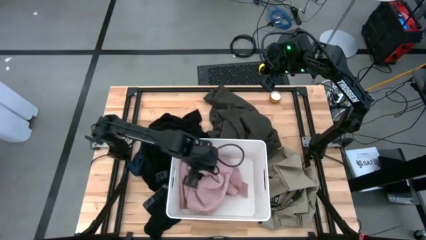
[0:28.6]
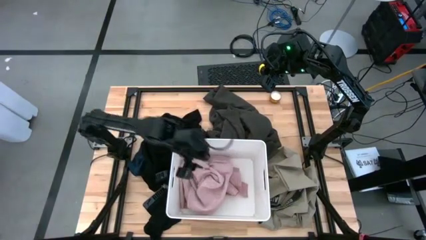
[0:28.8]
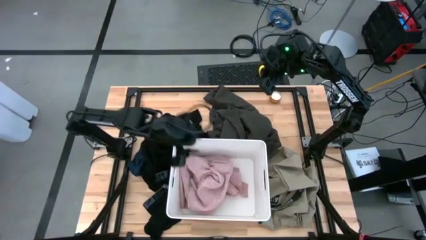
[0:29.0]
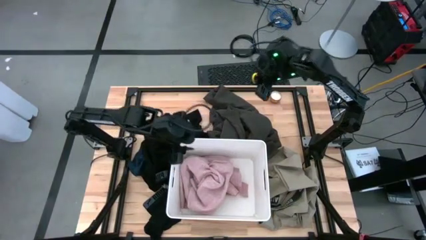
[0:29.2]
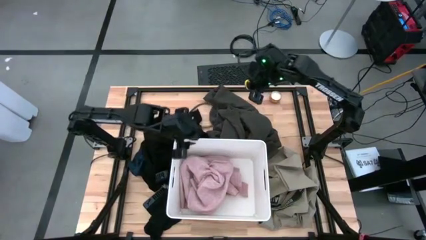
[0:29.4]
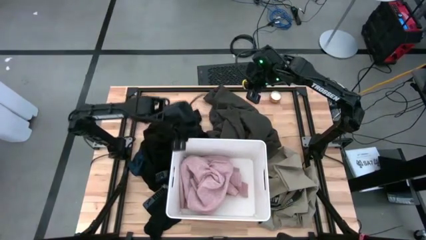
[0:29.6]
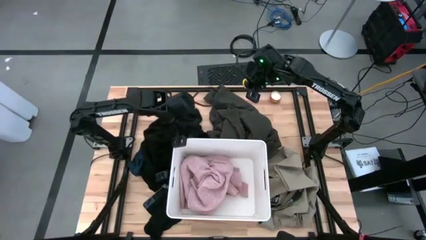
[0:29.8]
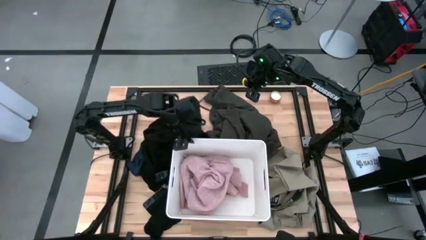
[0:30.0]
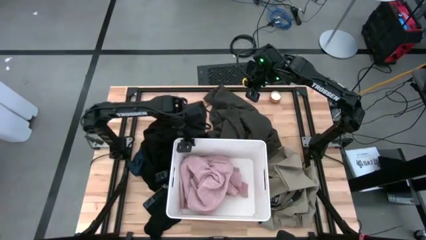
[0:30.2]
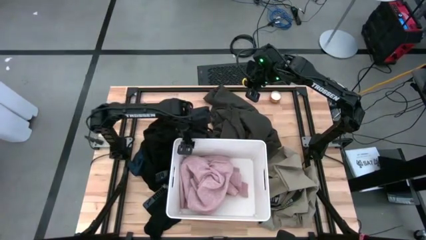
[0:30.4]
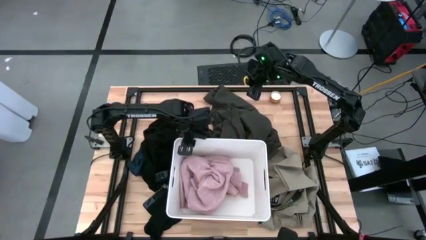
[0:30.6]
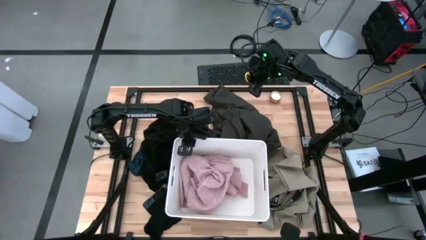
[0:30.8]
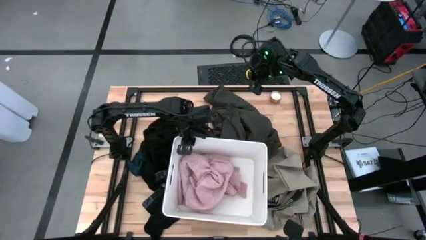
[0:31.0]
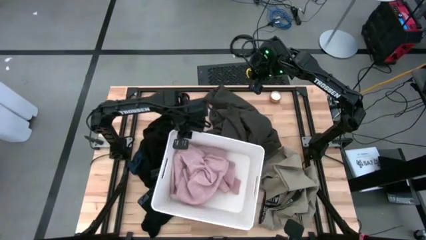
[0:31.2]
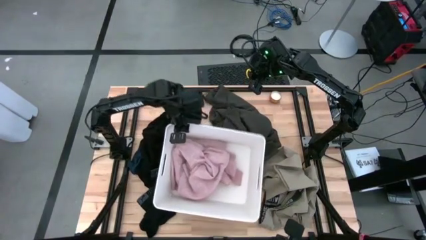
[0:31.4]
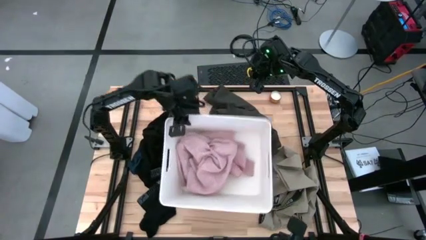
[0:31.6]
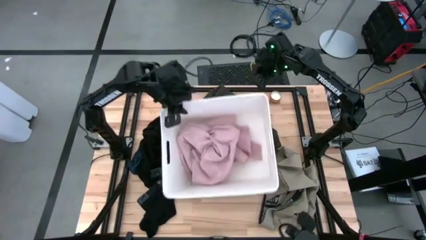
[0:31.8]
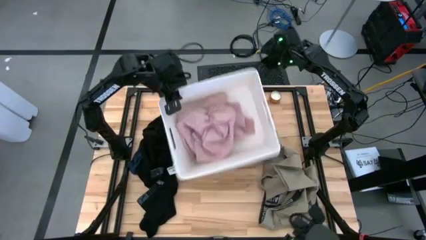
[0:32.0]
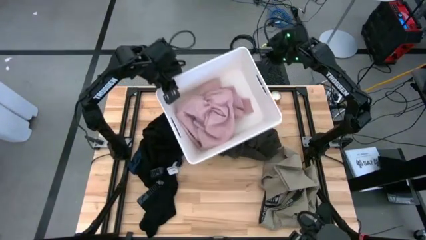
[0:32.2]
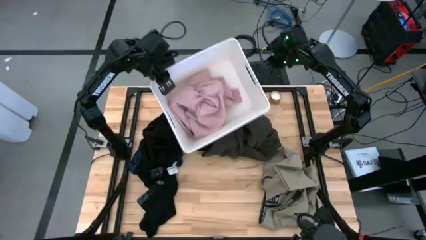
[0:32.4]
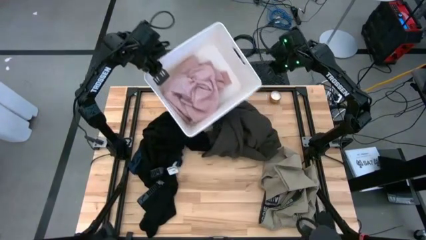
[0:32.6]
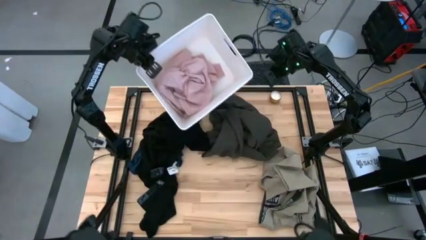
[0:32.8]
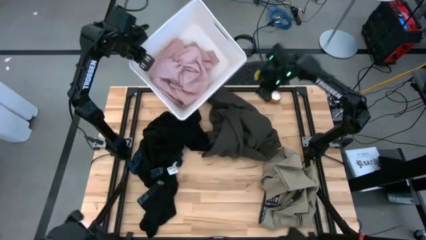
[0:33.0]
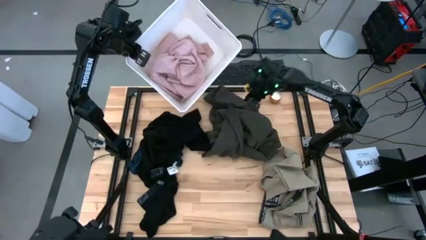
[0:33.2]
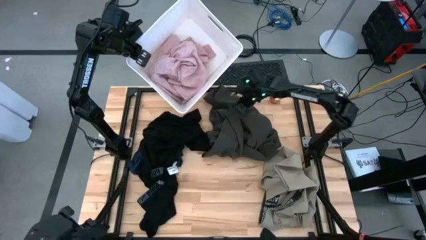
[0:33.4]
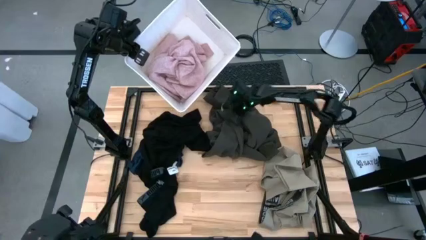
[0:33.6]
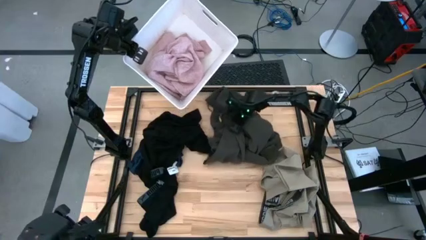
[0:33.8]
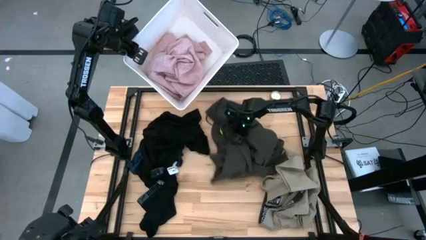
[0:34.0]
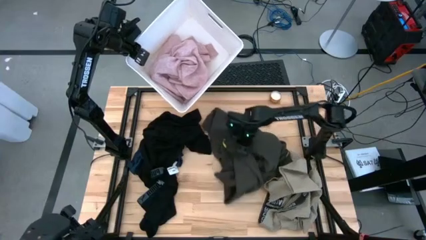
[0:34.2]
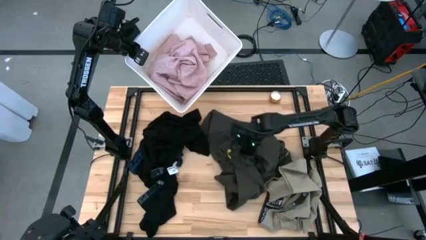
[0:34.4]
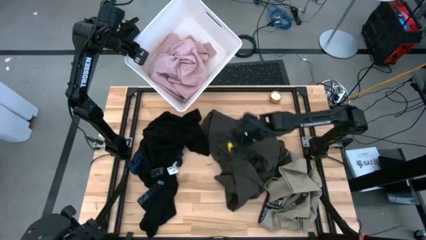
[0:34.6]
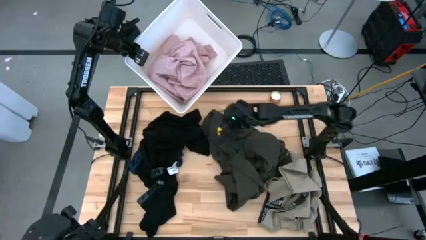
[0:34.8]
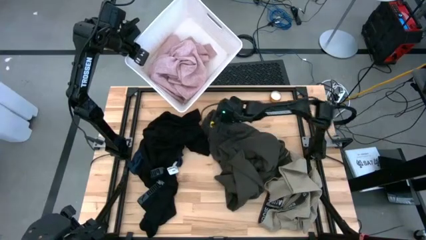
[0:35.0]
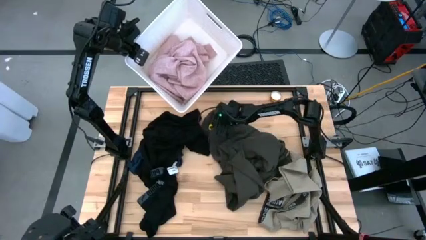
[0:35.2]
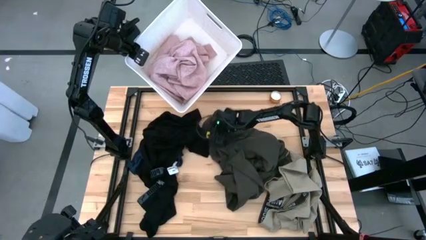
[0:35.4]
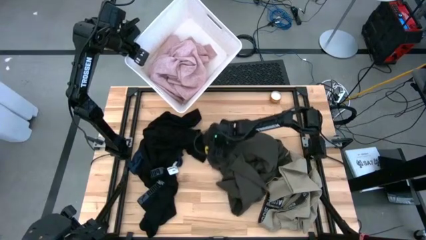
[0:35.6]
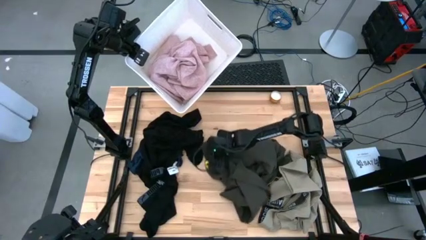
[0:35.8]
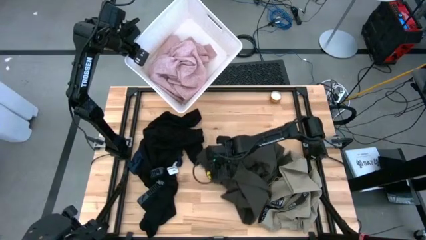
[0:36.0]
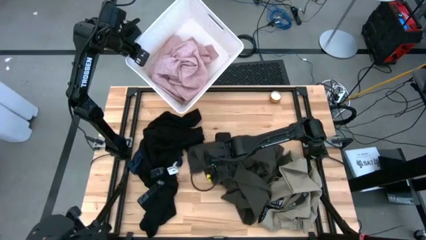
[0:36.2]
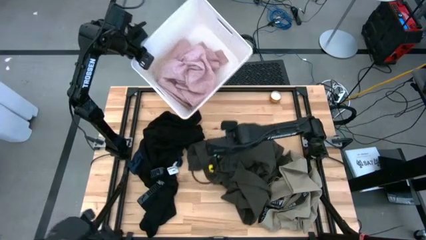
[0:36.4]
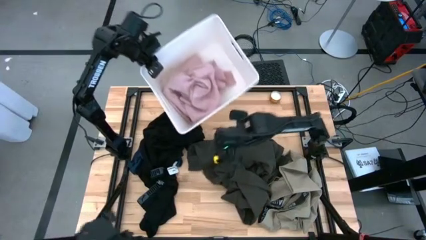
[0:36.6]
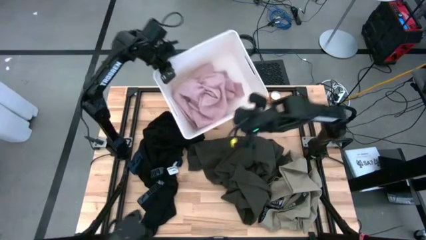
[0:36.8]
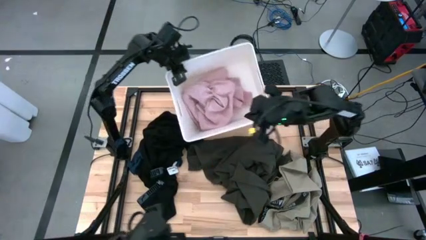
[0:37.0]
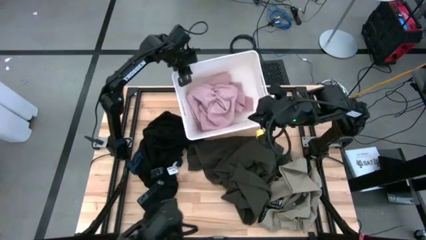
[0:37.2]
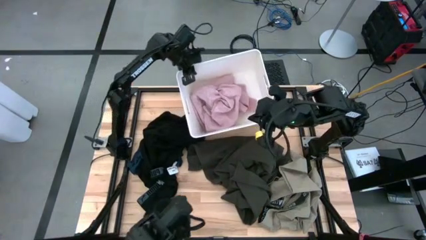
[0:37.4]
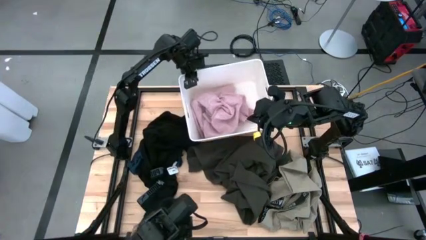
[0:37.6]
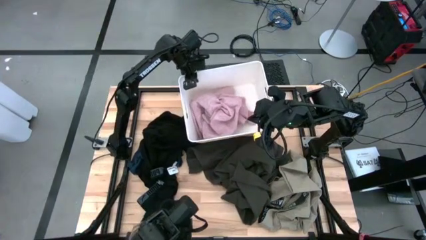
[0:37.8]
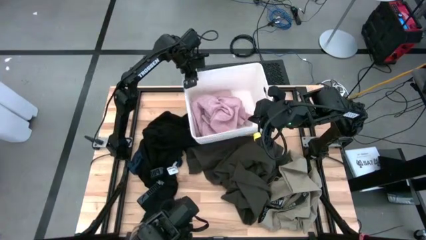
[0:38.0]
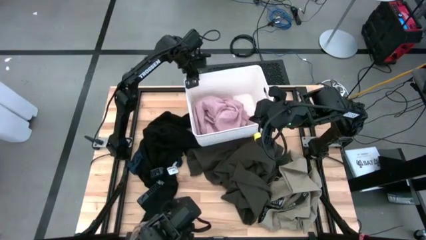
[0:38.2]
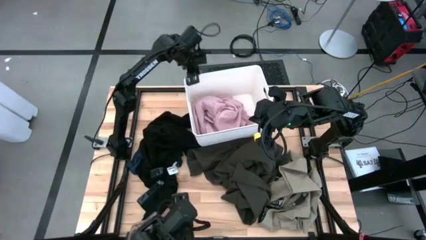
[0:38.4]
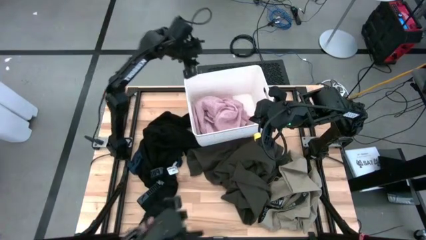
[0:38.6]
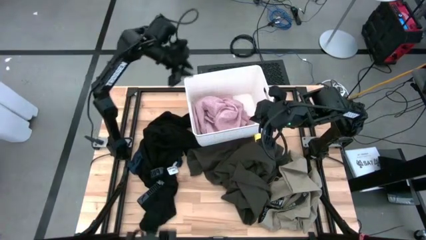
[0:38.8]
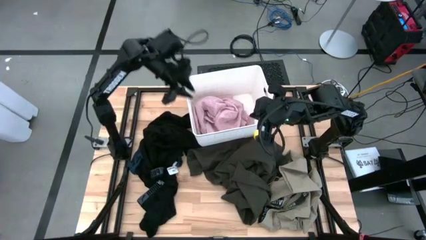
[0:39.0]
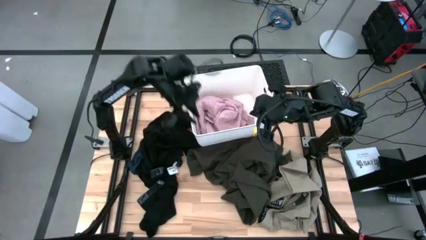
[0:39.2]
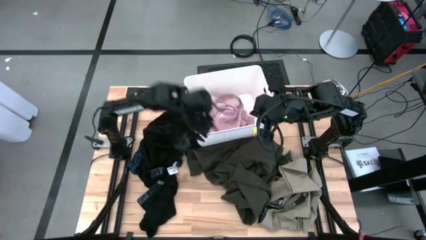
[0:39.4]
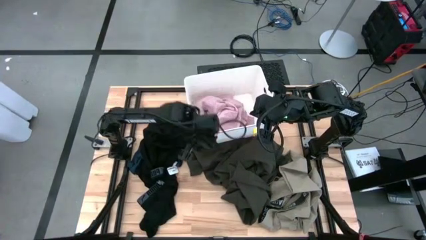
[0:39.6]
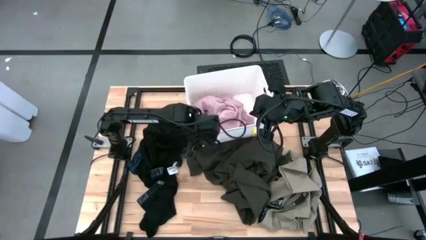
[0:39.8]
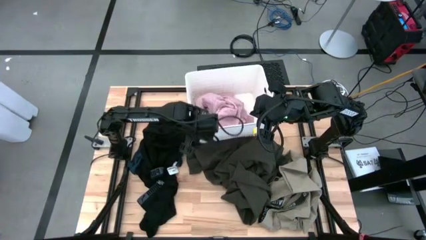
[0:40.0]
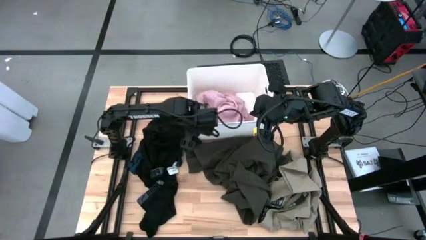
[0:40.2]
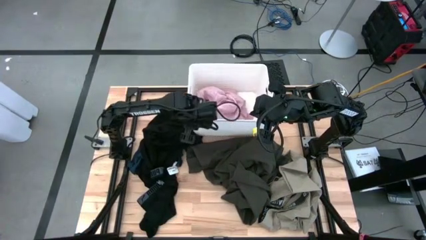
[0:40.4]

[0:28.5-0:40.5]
Task: Sort clothes
Move the laundry bin to the top center of the table

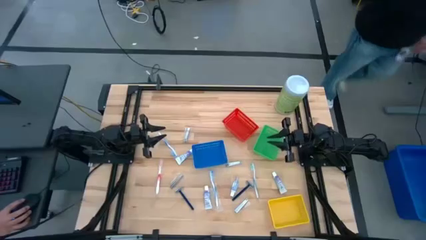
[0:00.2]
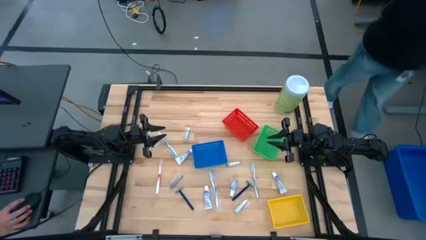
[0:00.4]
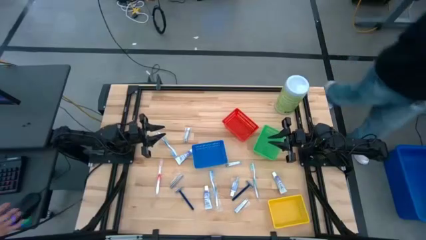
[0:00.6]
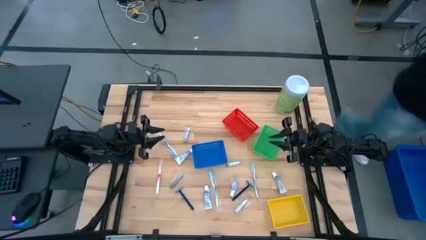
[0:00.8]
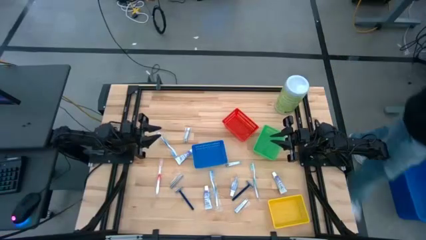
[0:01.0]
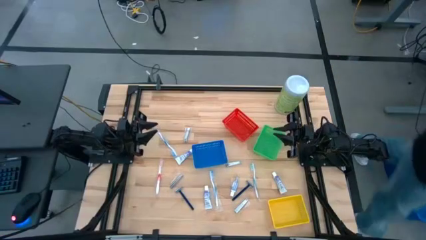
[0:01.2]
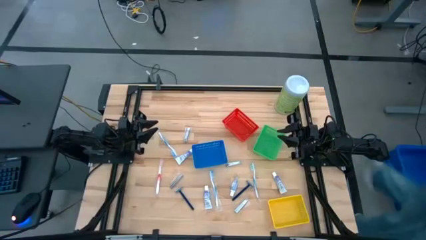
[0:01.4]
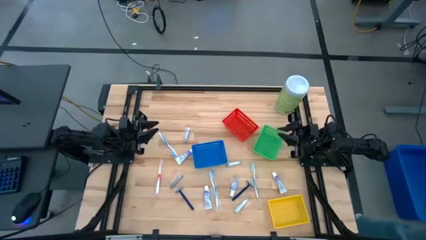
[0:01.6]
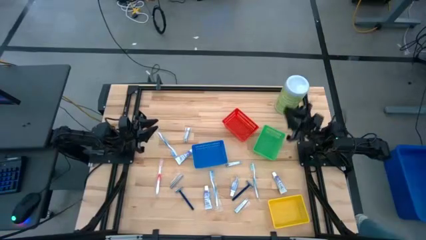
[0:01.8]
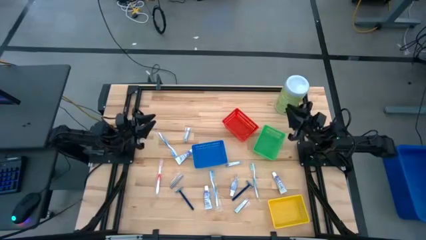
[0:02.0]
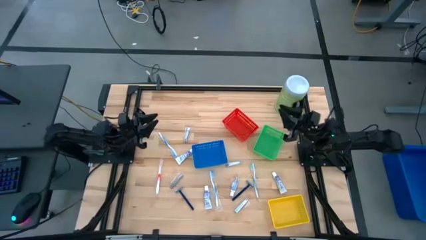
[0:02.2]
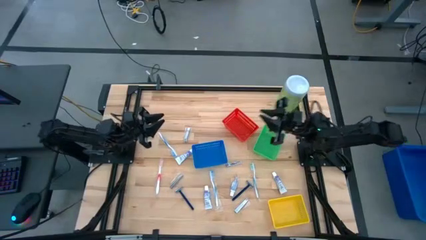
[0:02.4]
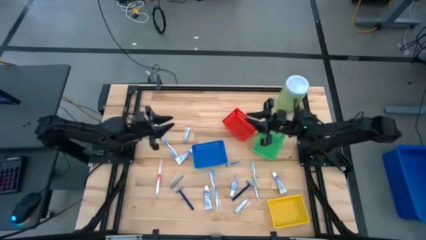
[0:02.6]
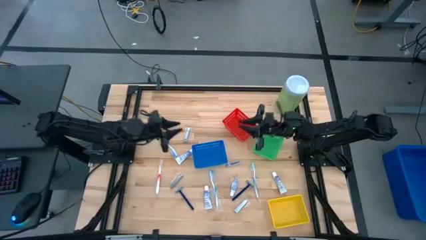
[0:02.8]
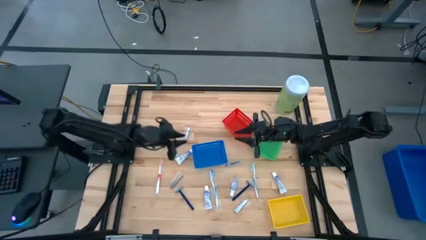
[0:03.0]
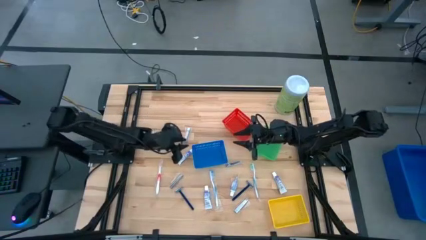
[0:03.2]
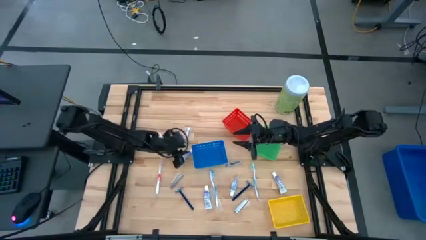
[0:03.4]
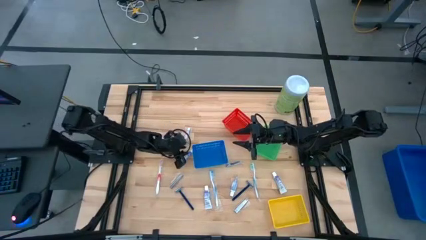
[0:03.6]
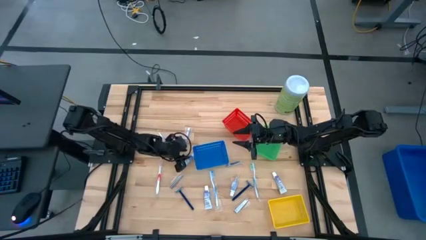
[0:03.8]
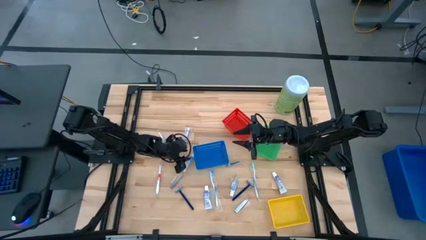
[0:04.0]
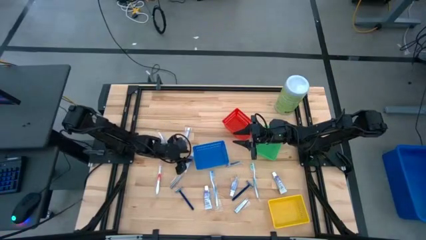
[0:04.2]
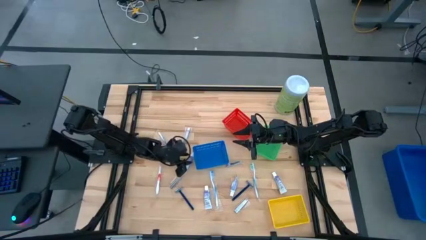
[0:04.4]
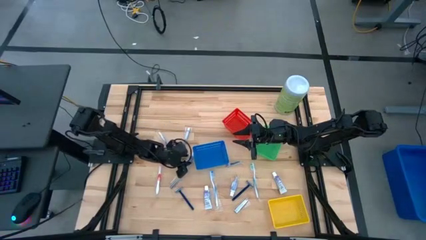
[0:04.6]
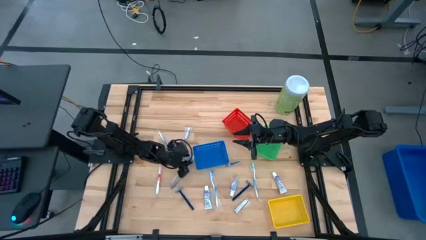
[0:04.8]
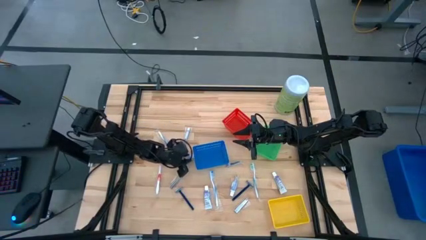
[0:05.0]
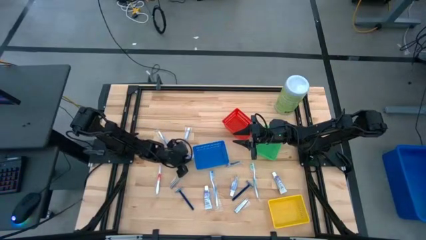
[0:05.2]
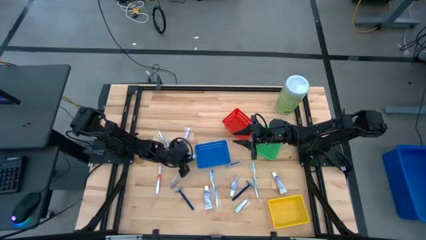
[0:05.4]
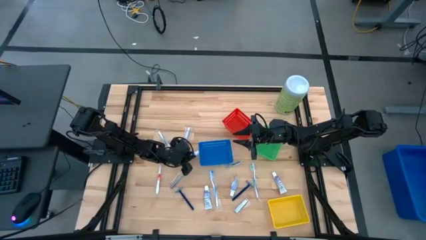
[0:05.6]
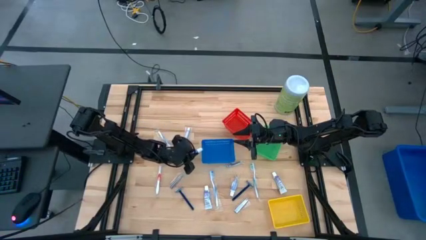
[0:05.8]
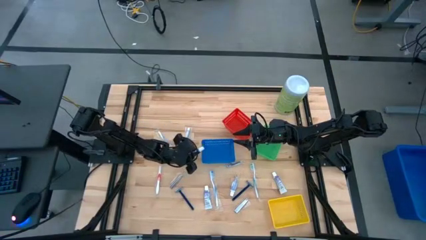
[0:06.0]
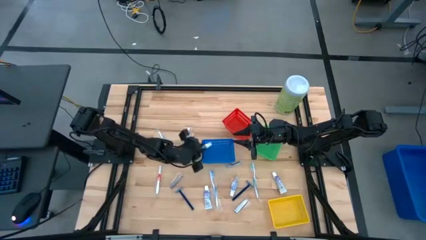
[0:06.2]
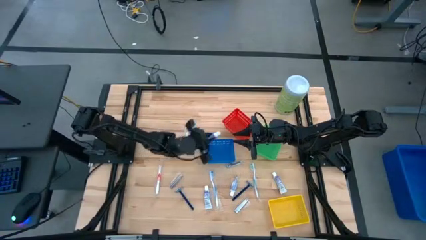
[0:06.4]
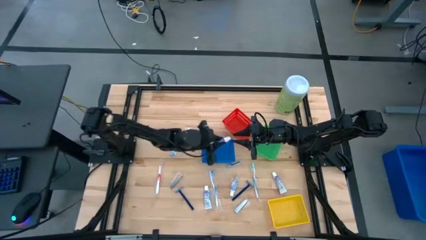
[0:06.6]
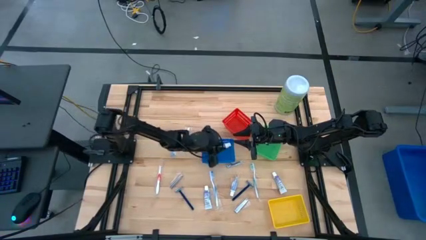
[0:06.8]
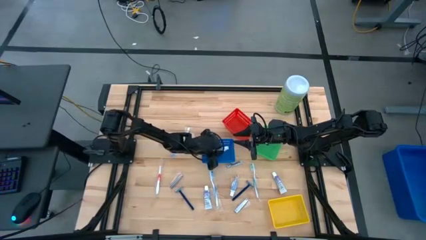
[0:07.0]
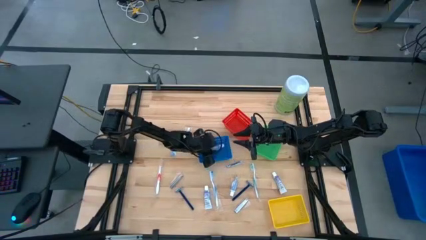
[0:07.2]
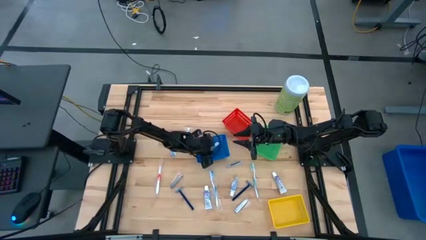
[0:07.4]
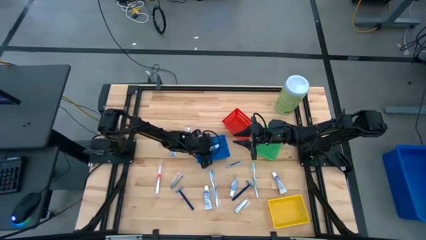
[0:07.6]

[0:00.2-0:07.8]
Task: Pick & Place Travel size toiletries
Put the white toothpaste into the blue bin
